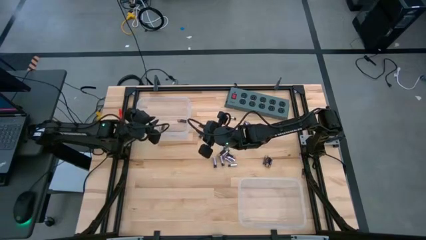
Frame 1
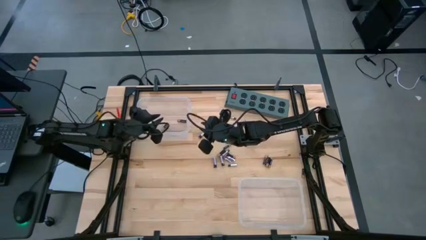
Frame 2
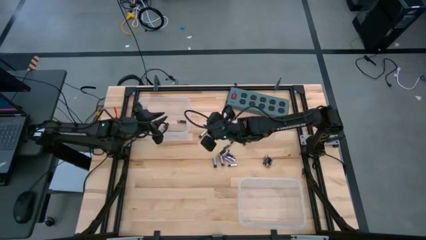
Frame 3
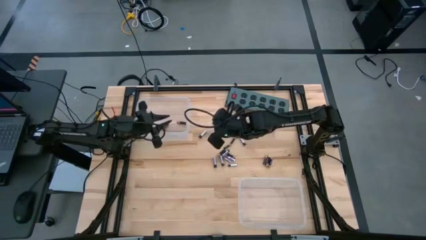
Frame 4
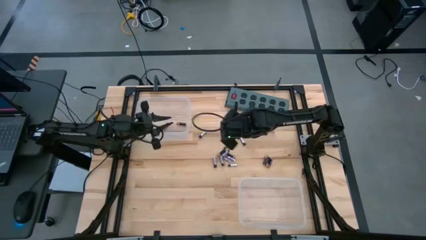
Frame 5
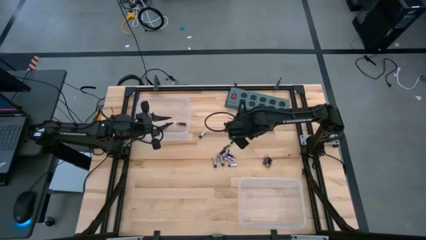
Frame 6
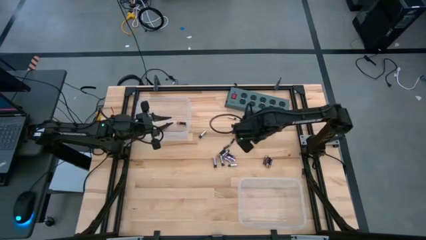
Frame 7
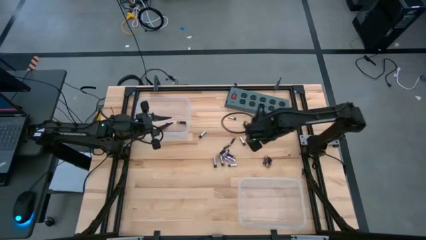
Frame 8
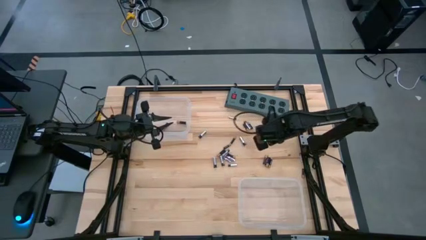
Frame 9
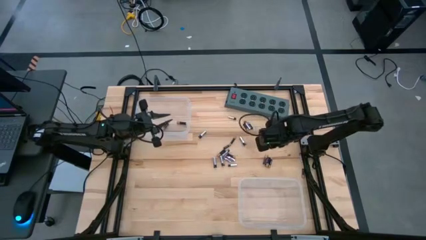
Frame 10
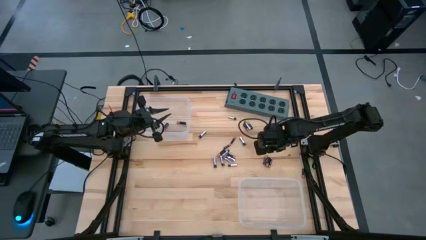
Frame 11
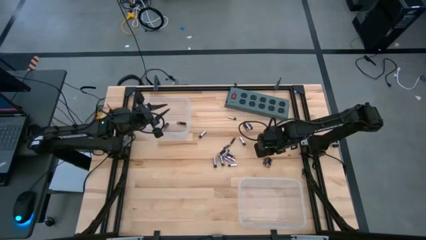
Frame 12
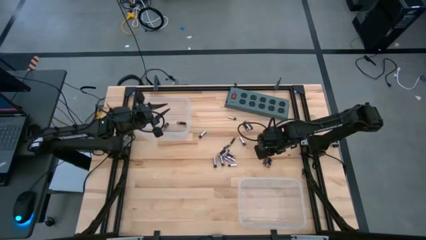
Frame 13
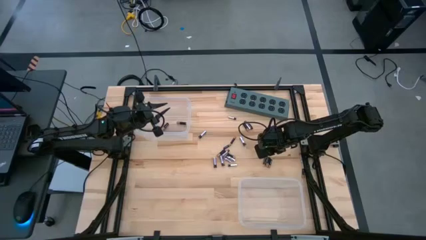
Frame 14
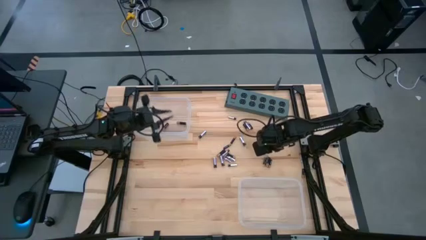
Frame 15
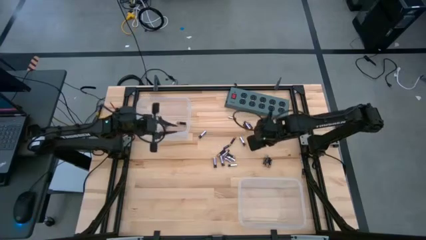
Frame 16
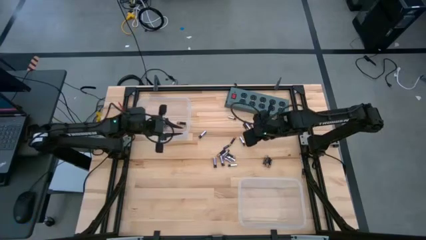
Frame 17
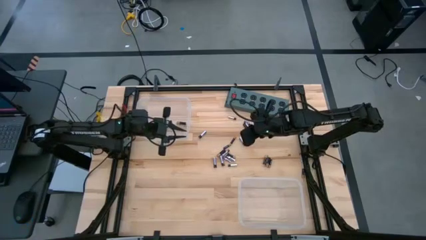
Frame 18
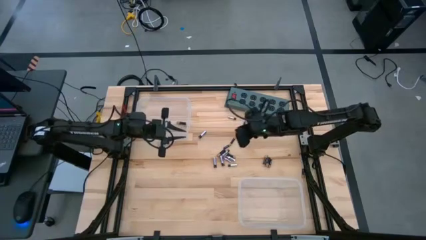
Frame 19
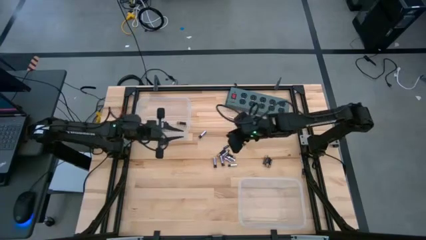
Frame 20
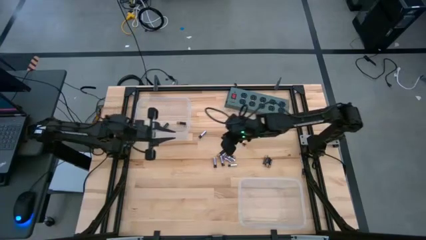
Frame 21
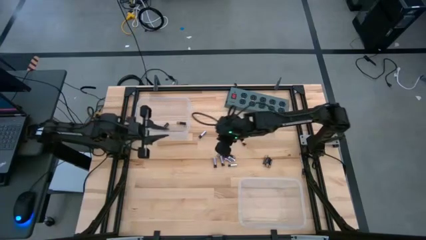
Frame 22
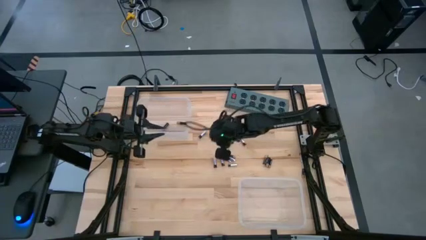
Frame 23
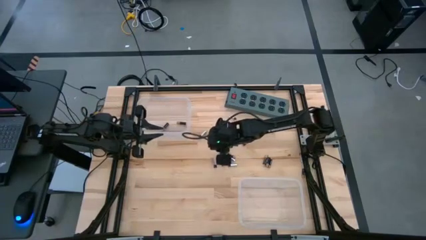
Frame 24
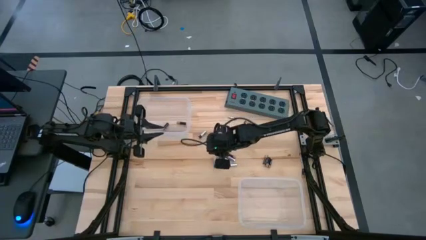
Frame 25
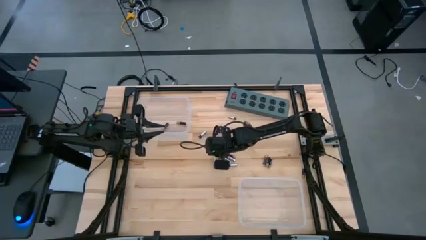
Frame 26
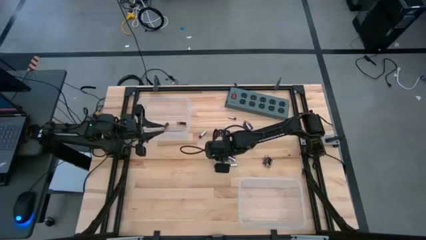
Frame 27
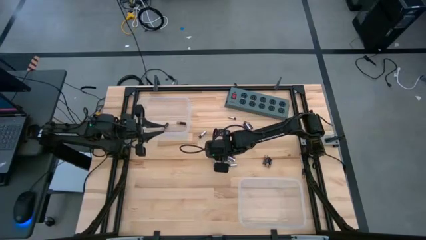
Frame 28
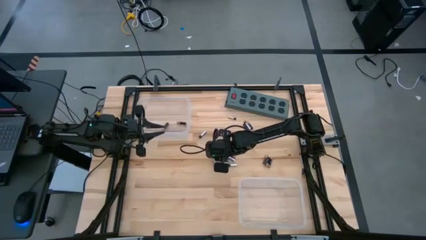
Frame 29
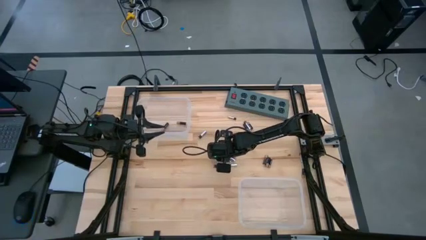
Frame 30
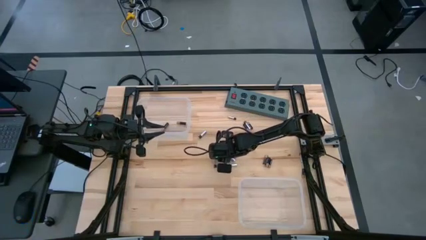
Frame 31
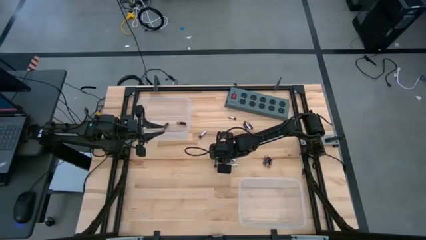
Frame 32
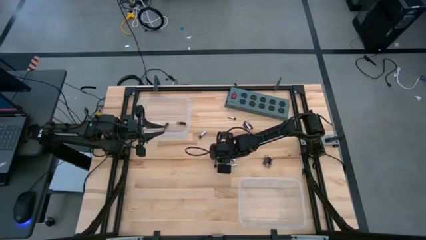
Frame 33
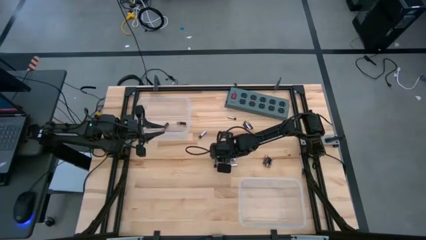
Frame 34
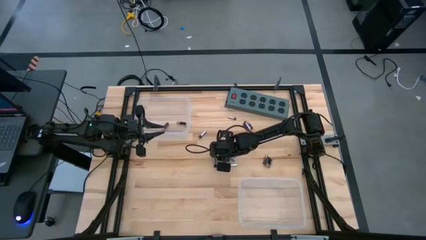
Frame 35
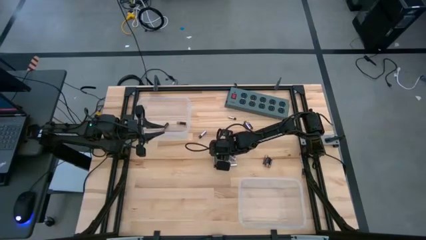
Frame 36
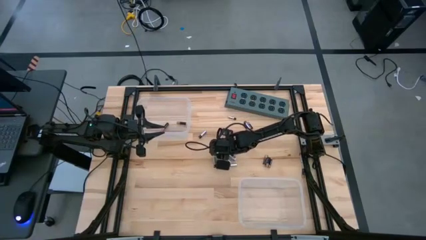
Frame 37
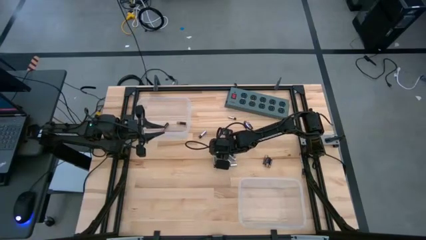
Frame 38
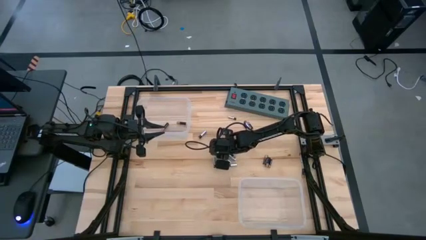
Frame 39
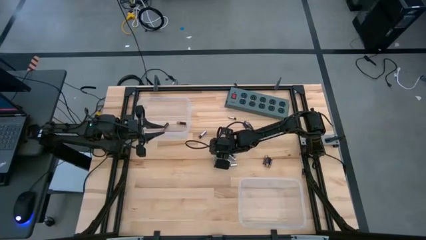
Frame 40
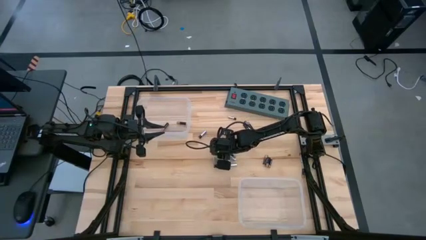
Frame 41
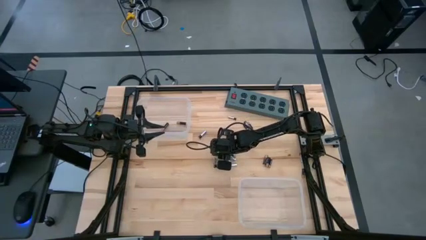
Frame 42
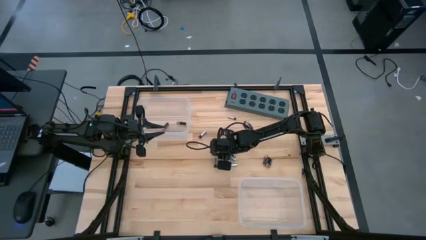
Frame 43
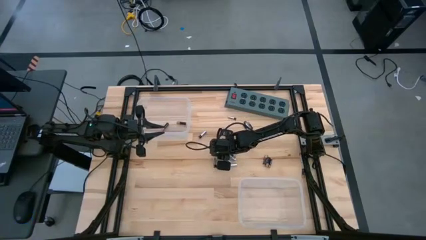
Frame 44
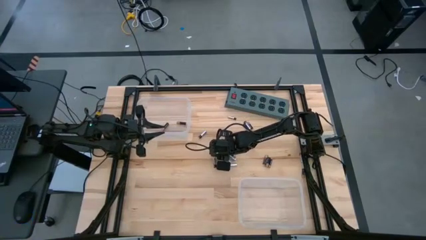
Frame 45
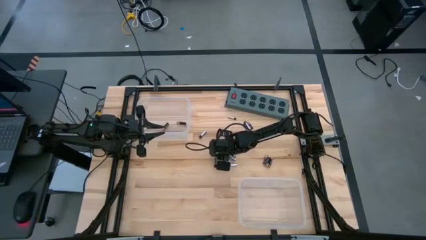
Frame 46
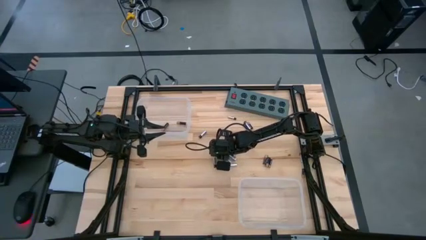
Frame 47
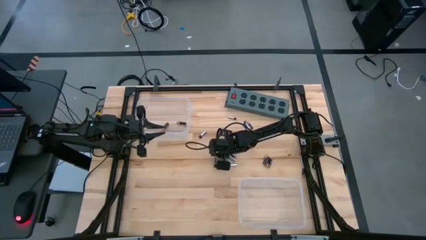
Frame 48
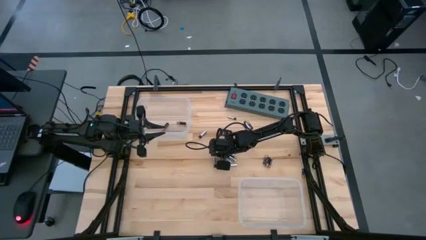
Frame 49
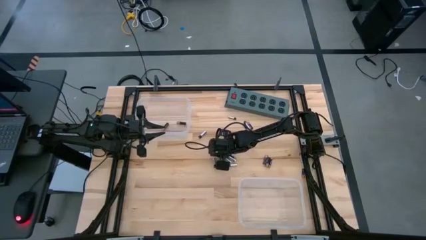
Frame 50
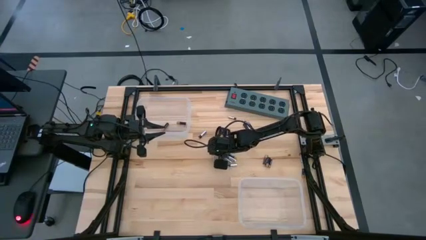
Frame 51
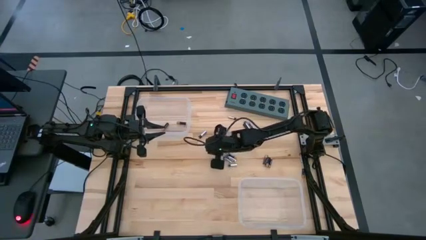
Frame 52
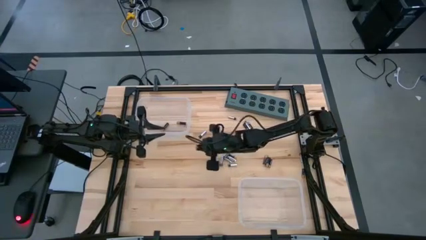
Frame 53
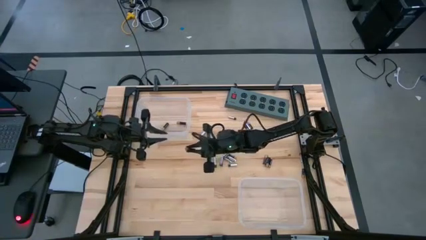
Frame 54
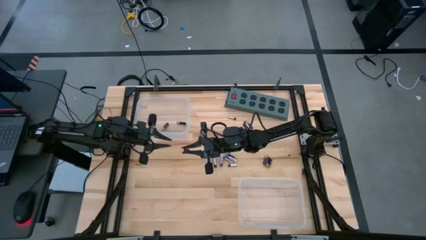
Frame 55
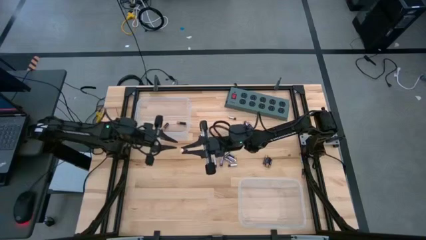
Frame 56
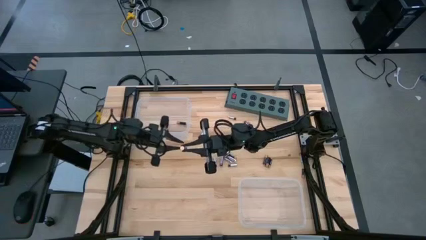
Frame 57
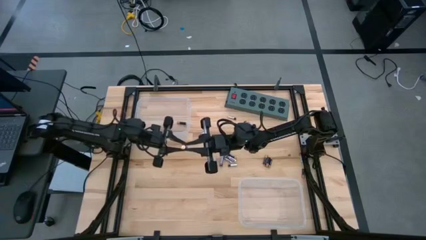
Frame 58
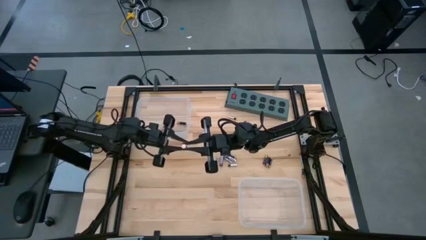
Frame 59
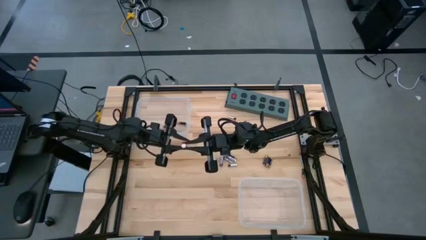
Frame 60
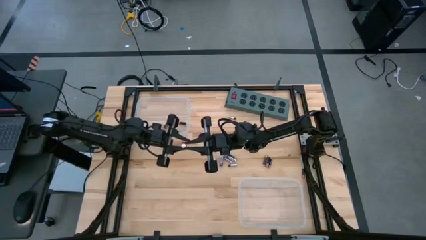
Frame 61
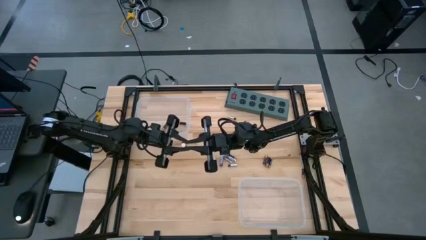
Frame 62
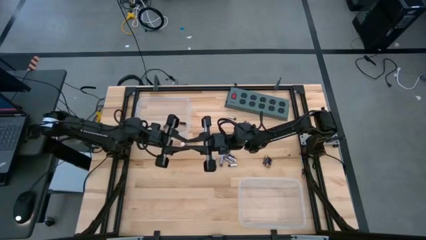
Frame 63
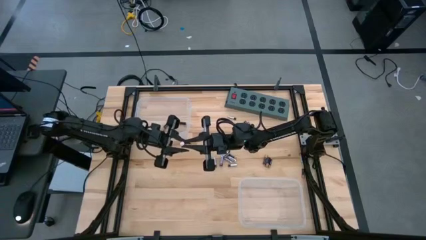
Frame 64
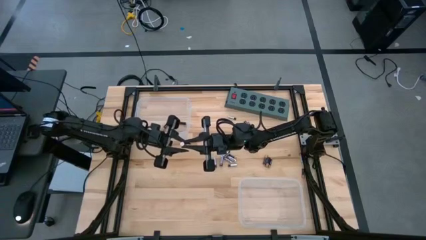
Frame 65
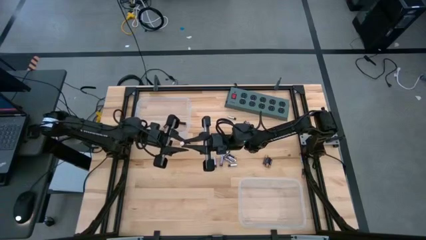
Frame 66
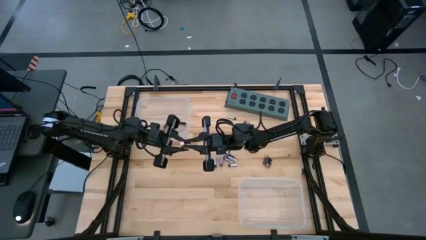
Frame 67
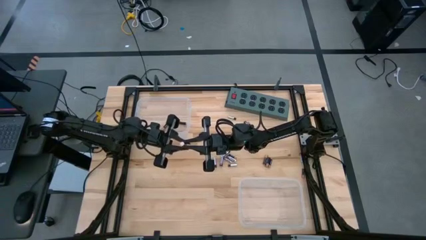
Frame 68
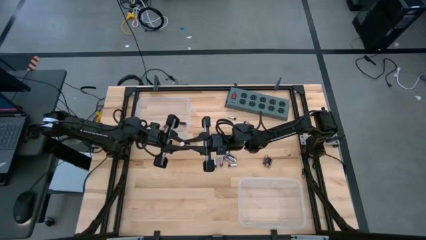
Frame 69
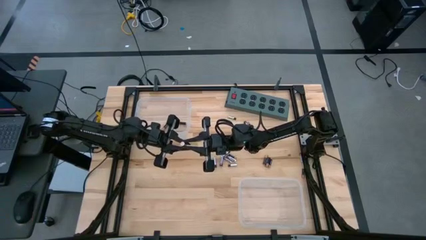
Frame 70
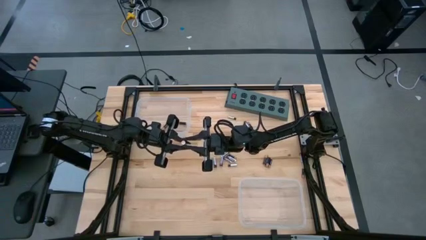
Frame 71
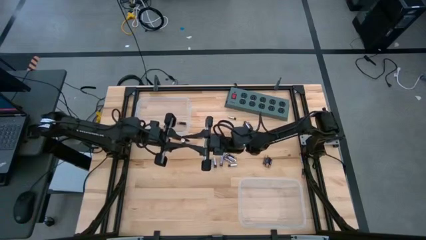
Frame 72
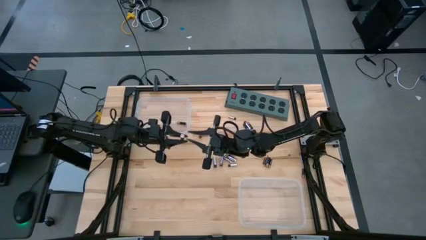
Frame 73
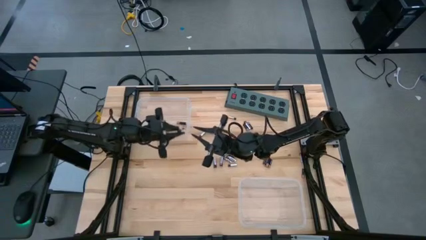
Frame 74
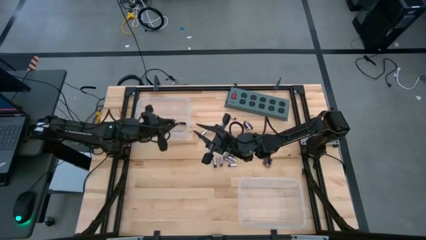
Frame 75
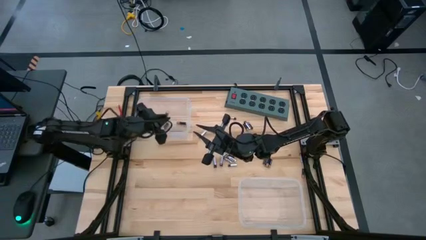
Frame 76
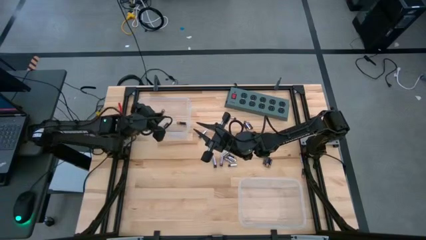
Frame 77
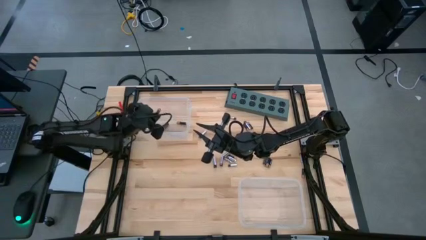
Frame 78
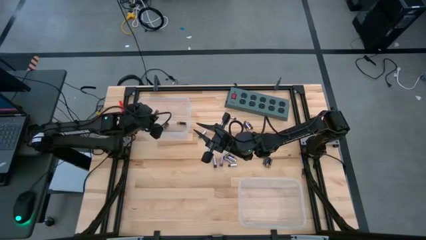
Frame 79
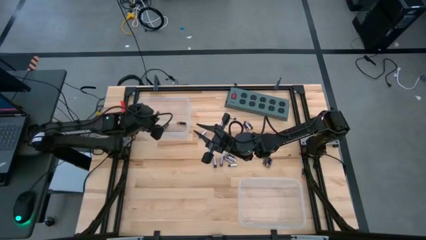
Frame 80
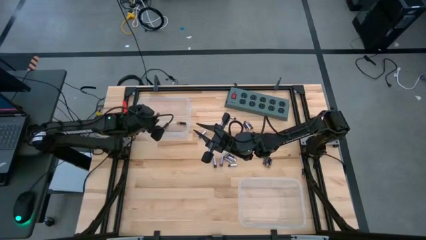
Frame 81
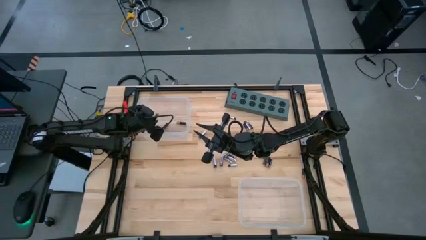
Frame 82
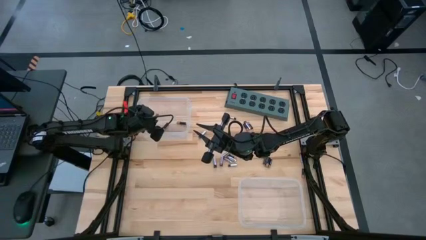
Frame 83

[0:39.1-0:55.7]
Task: Sort batteries
Put the black battery into the top transparent bin
